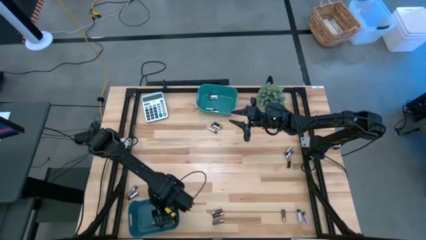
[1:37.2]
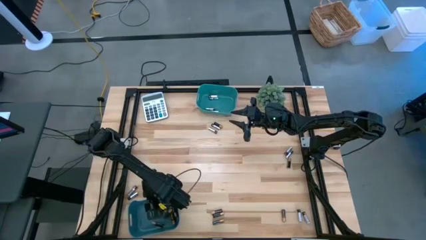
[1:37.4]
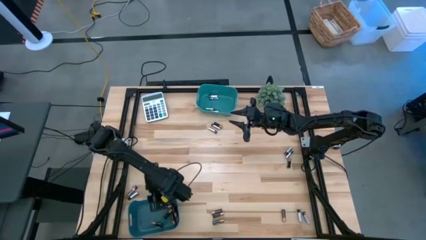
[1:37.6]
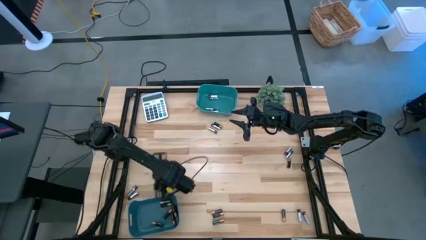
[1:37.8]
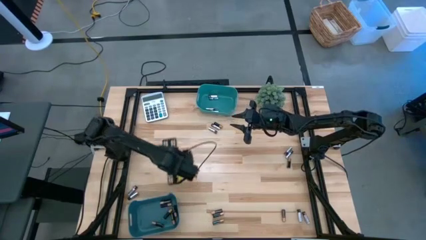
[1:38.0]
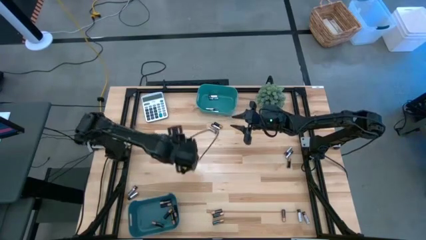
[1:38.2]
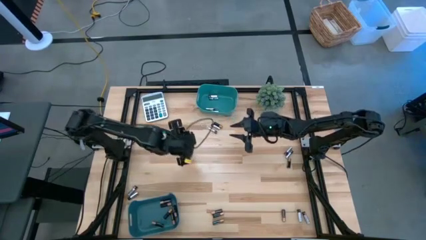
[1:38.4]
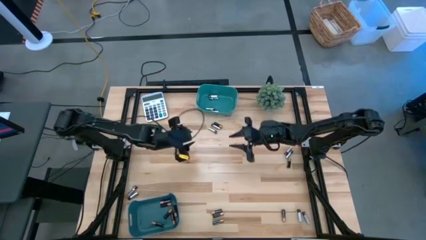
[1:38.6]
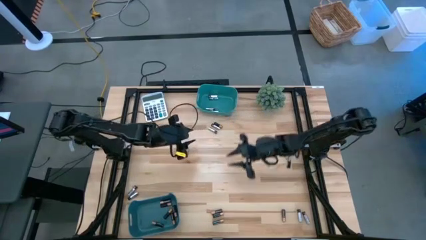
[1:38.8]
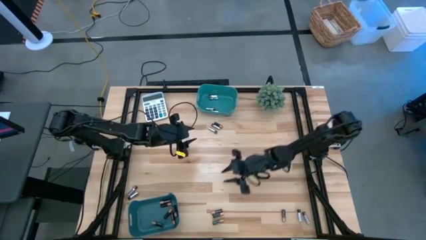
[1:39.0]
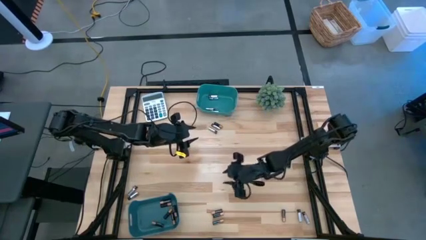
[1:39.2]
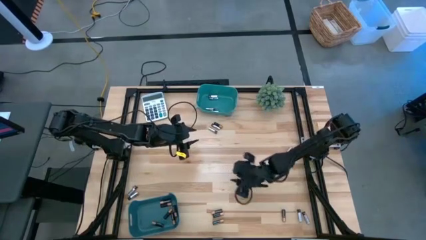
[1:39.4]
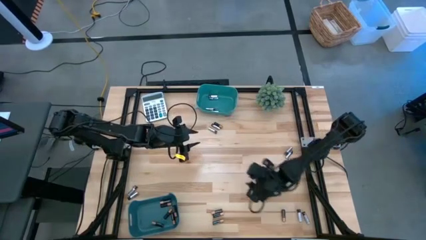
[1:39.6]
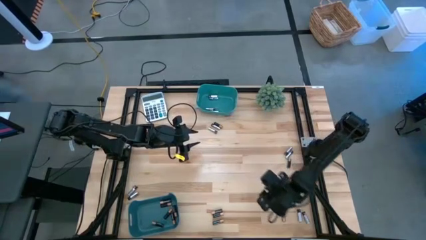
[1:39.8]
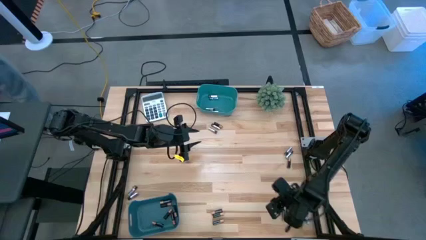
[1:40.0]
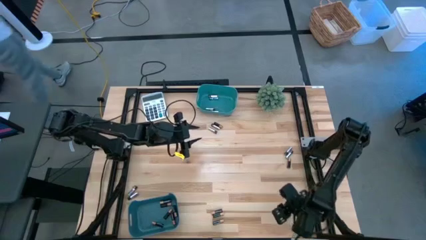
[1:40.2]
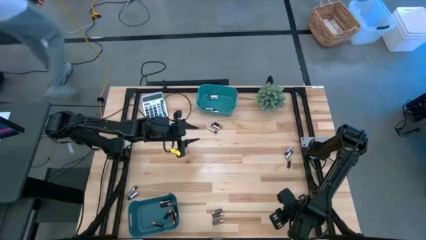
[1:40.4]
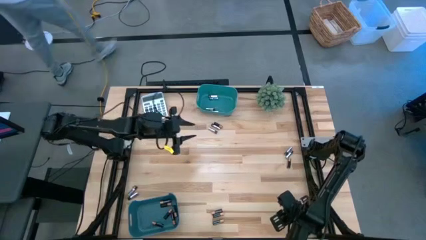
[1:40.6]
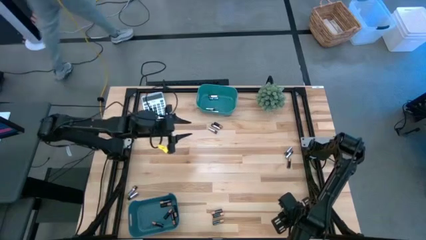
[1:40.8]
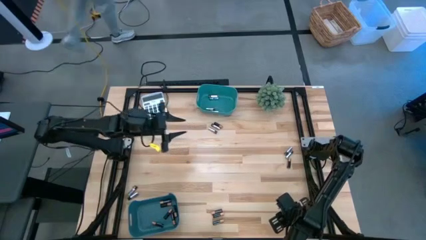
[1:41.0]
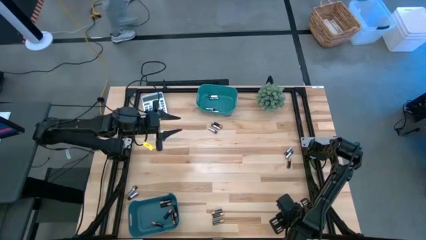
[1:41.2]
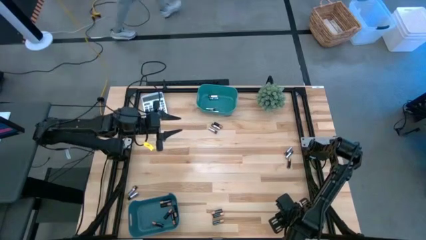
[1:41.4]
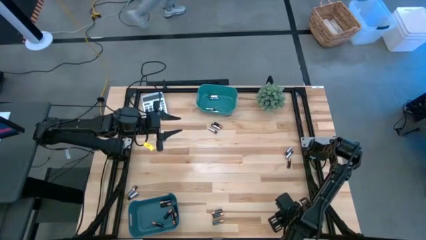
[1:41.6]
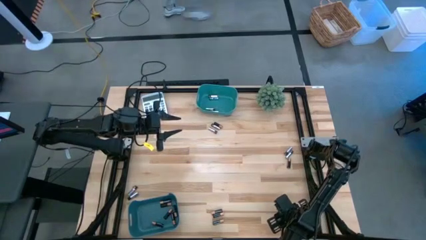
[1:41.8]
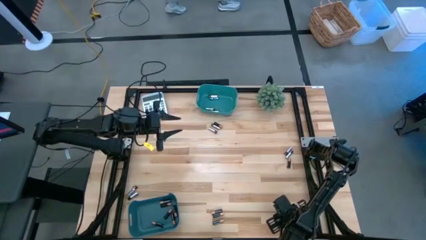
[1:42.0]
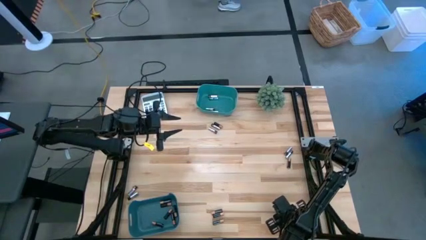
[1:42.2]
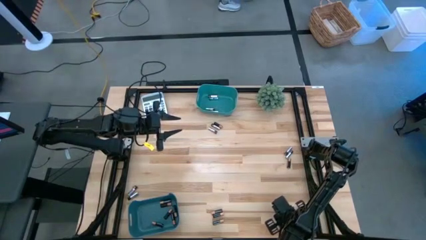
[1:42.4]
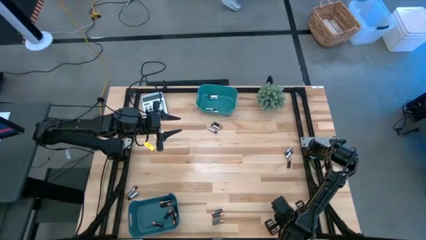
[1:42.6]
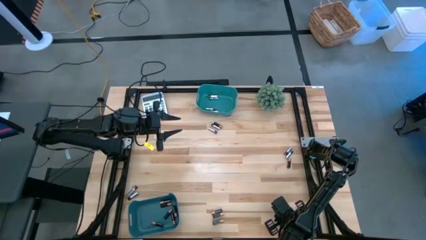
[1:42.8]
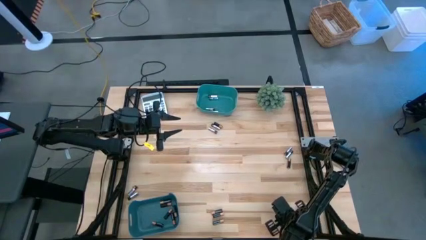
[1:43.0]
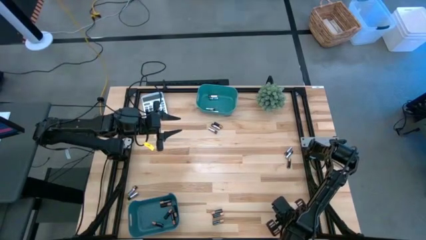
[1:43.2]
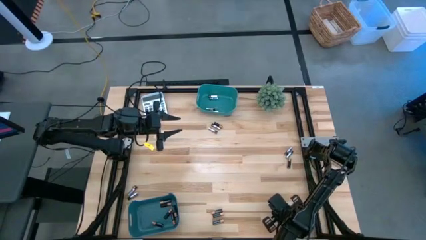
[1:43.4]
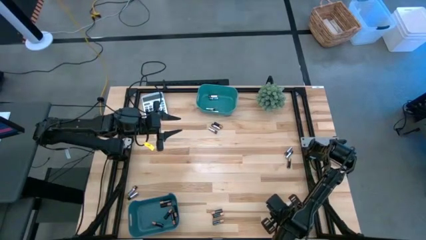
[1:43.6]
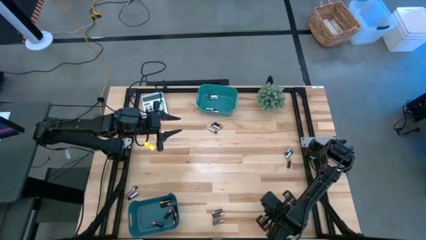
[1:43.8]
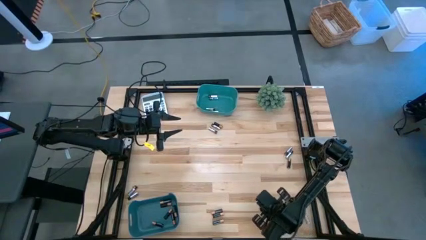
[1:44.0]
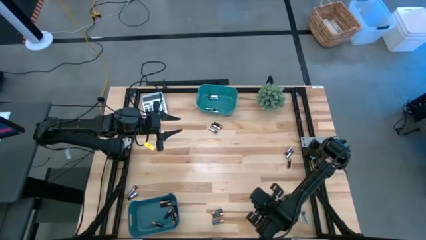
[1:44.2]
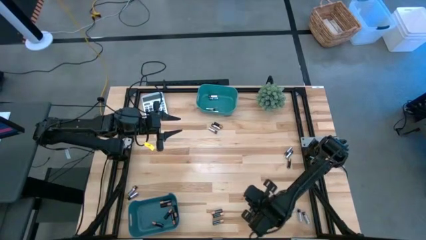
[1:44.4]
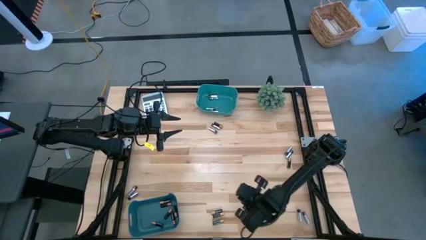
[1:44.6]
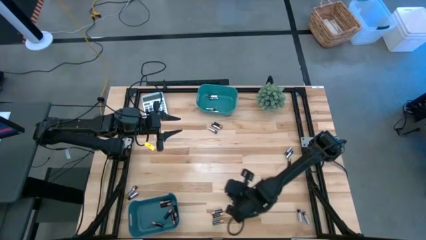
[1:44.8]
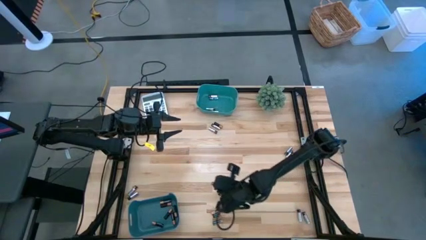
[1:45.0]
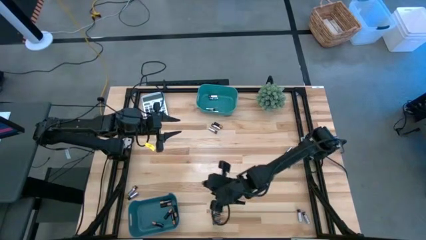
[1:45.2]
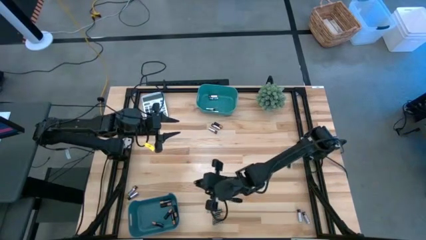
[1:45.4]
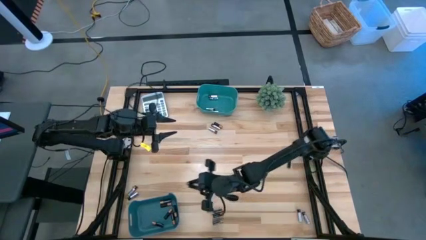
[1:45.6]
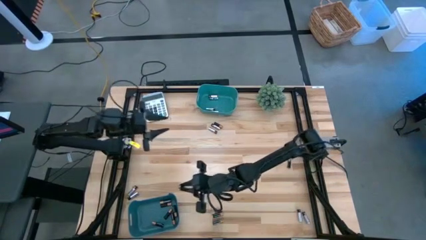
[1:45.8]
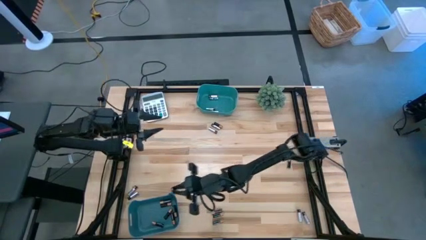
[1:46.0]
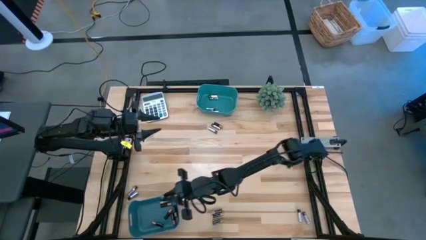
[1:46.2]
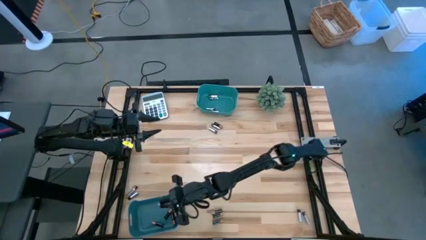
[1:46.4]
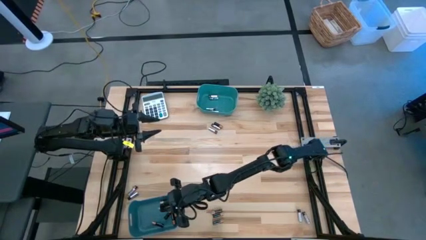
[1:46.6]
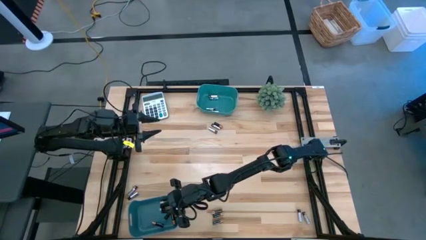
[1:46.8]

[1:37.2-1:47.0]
Task: Sort batteries
Put the gold battery into the bottom green bin

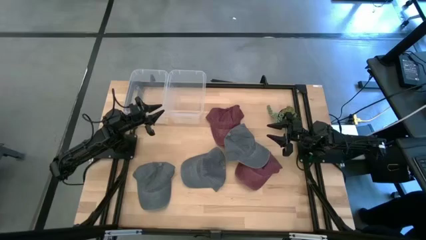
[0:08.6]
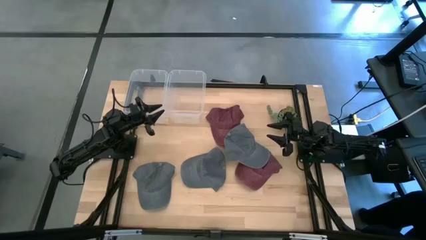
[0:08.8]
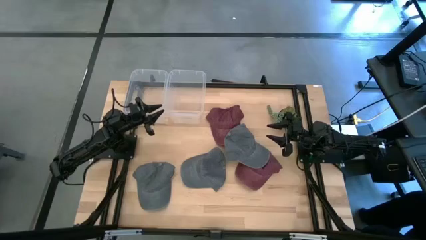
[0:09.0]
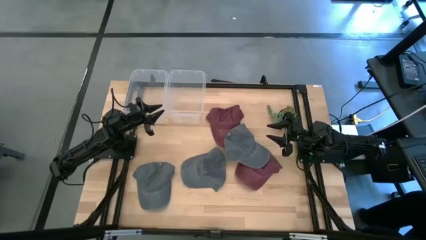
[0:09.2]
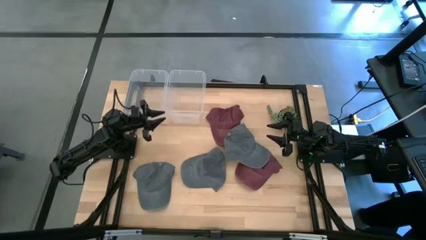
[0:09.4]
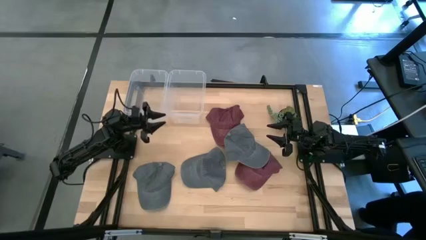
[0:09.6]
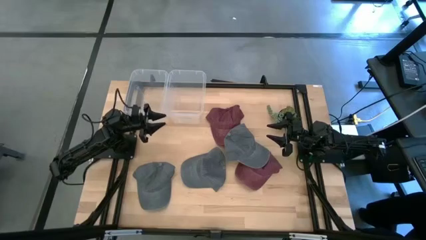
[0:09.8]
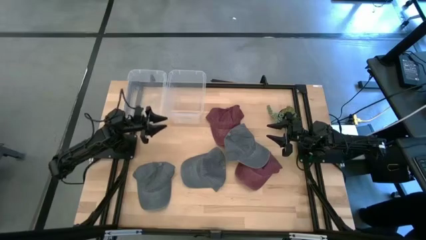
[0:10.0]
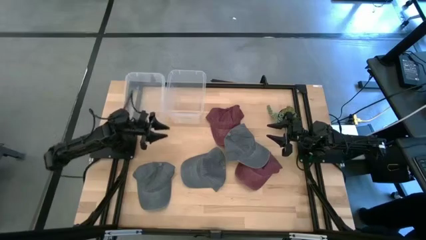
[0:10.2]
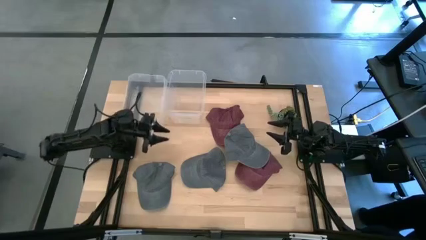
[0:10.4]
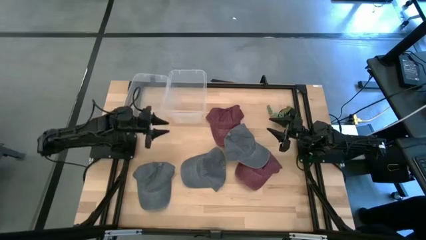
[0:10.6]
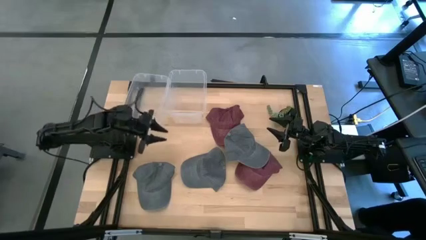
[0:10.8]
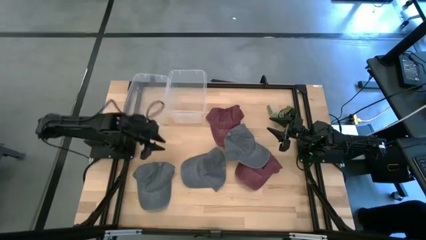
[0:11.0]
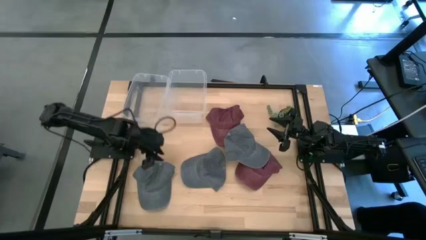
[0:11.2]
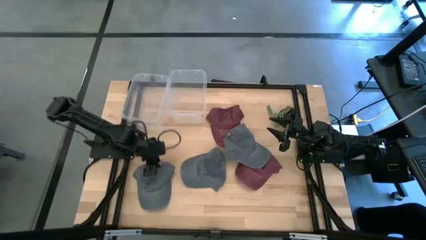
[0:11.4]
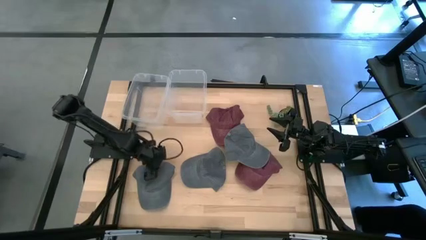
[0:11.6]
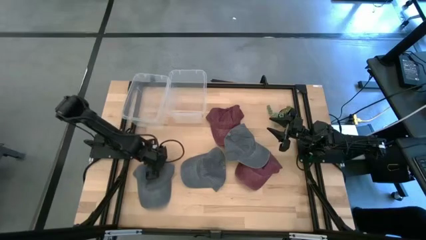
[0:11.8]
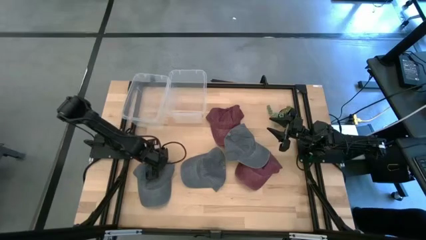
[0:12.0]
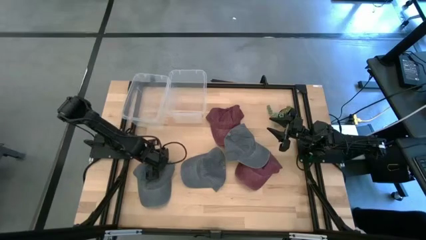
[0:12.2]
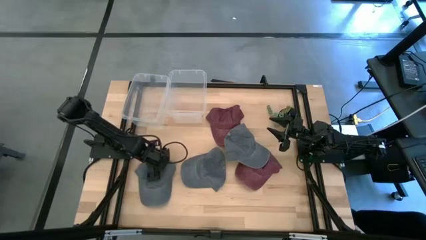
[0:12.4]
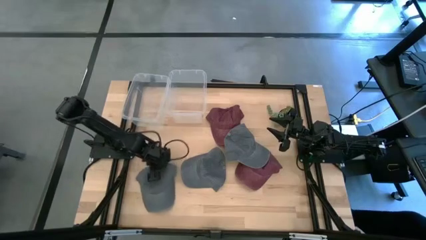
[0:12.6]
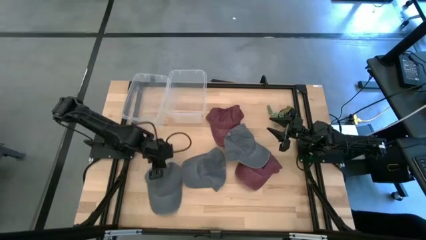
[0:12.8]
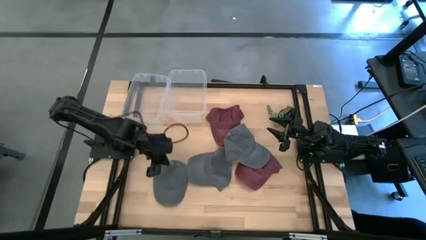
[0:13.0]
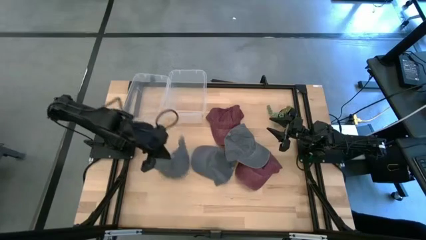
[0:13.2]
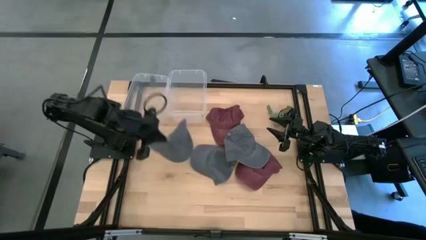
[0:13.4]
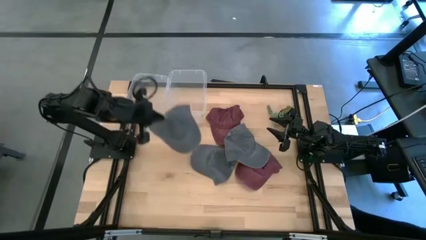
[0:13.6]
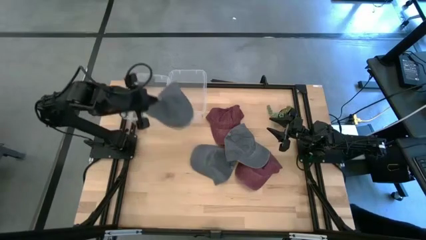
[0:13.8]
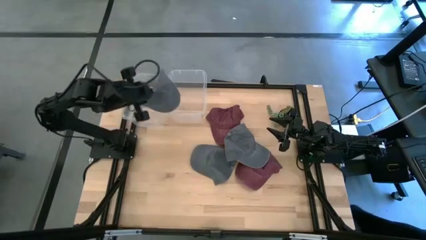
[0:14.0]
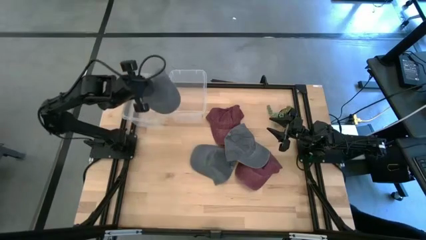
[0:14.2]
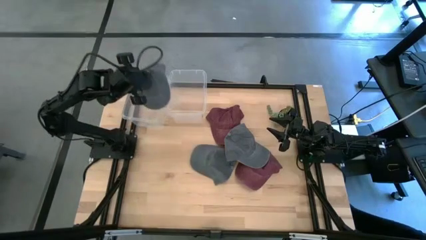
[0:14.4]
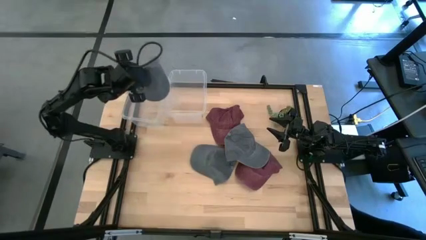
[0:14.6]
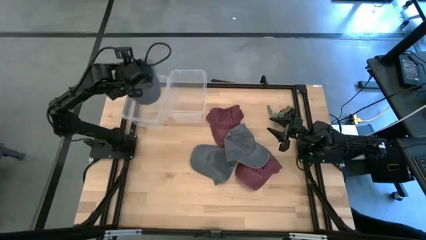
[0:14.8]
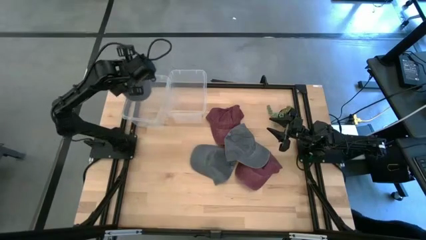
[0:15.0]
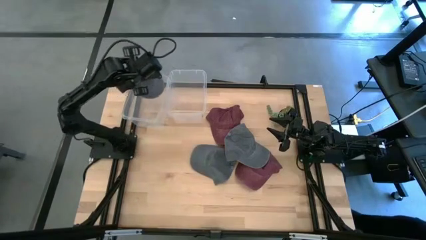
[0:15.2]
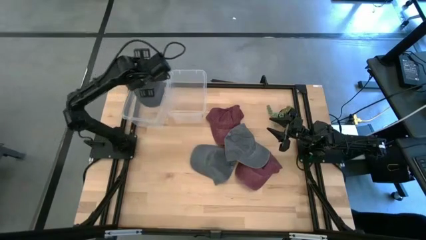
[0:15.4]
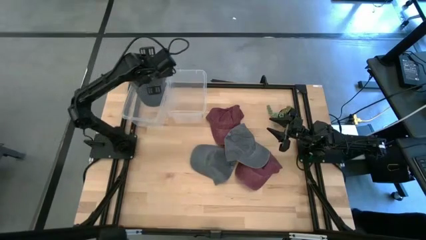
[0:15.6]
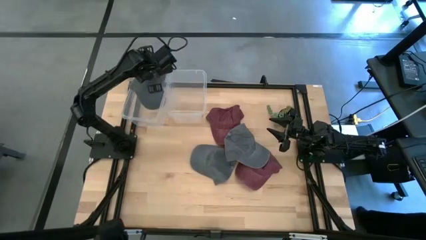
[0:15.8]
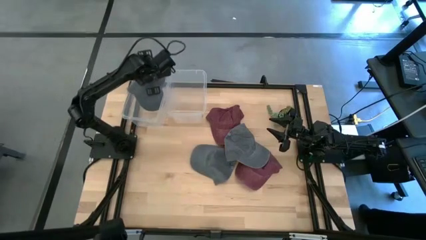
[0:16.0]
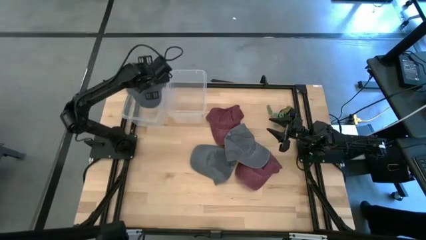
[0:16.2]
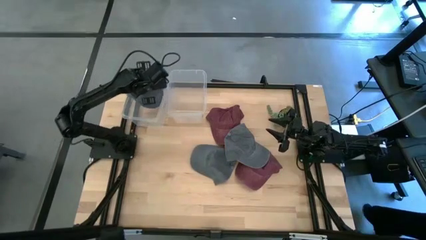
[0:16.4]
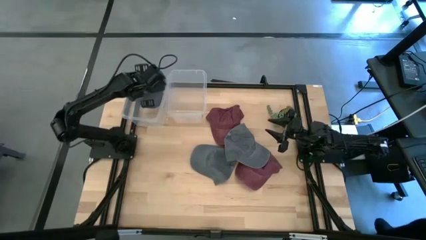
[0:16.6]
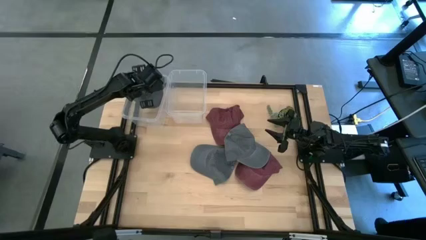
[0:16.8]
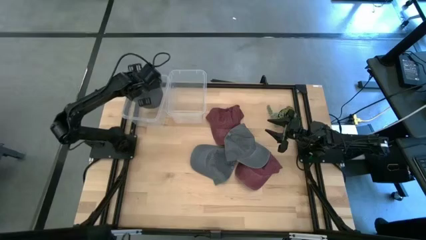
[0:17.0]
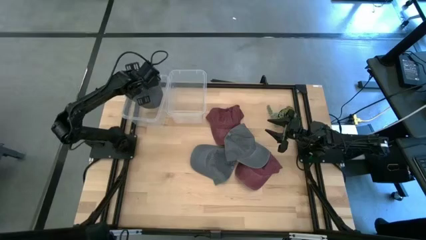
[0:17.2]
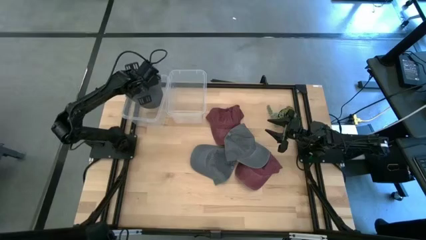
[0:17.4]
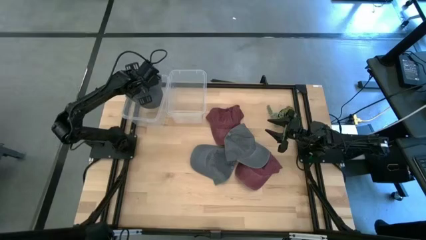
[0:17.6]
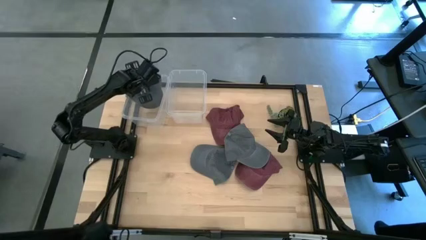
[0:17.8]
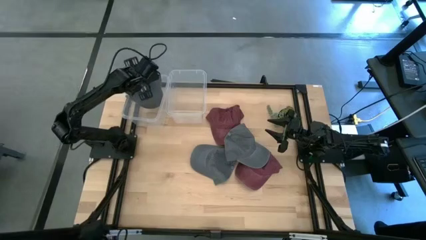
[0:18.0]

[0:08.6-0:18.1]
Task: Pick & Place hat
Put the left gray cap into the left transparent bin
